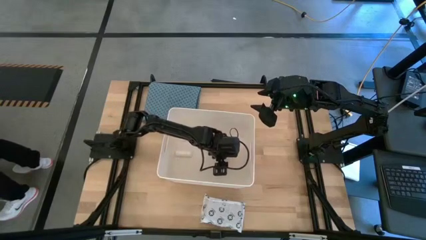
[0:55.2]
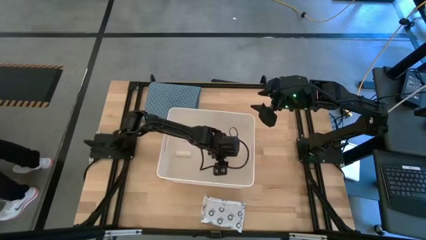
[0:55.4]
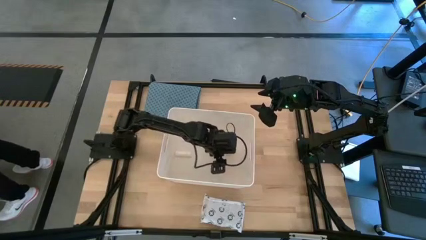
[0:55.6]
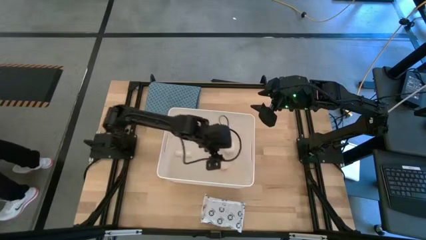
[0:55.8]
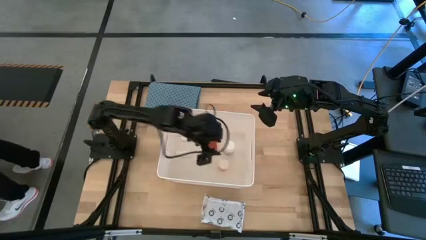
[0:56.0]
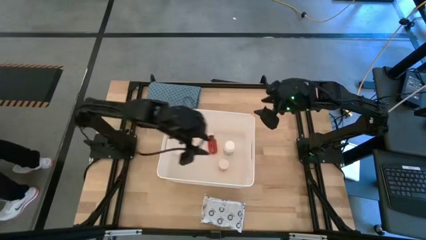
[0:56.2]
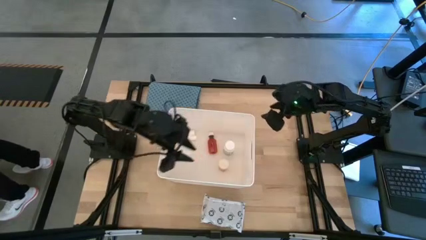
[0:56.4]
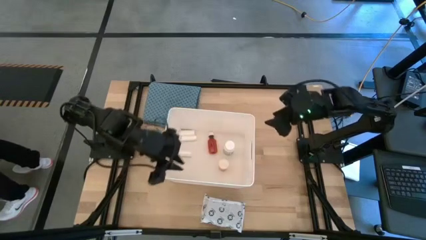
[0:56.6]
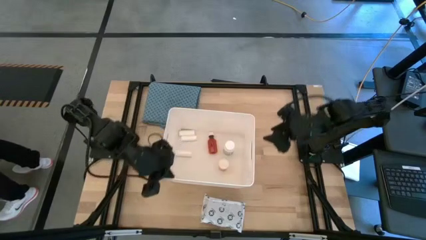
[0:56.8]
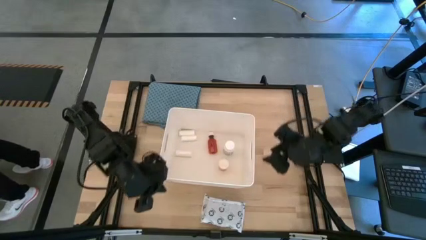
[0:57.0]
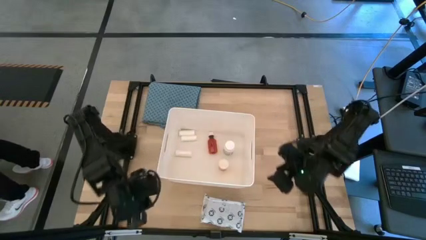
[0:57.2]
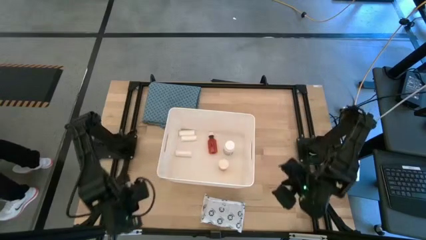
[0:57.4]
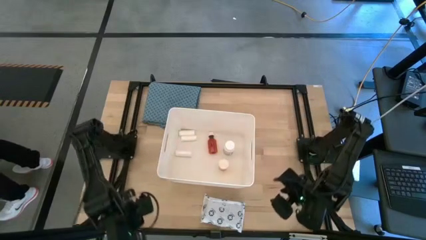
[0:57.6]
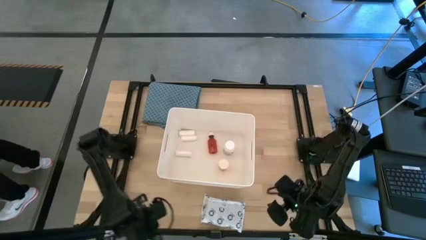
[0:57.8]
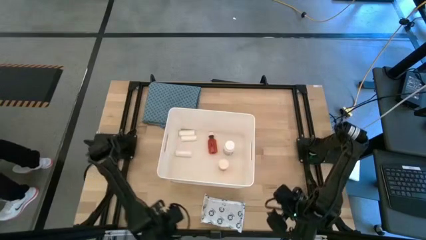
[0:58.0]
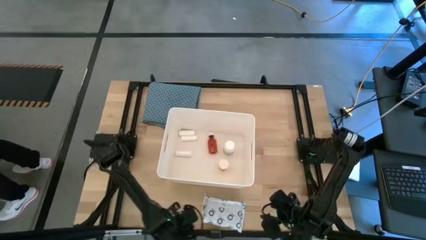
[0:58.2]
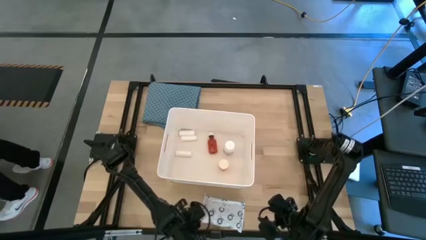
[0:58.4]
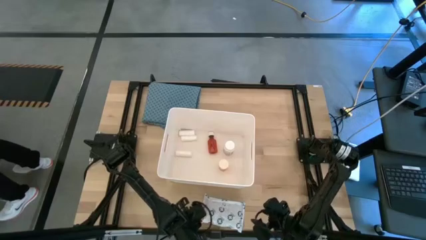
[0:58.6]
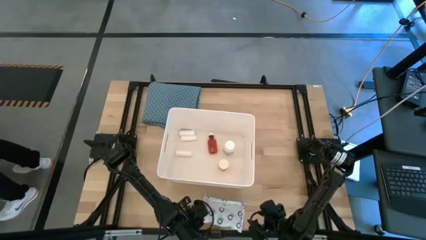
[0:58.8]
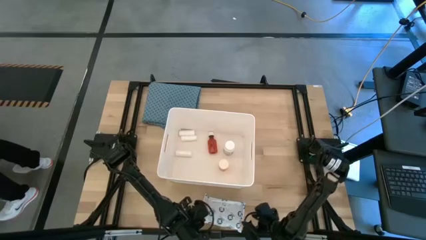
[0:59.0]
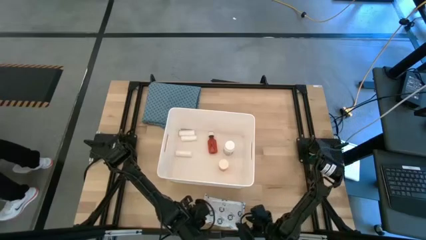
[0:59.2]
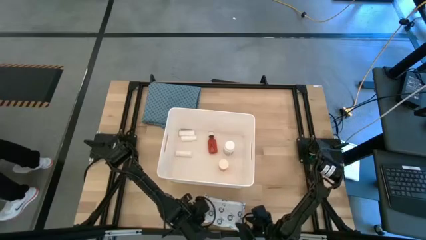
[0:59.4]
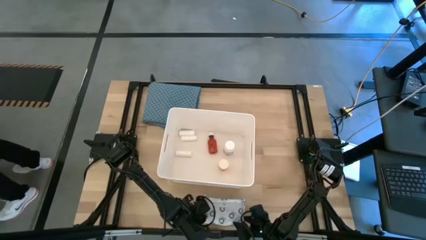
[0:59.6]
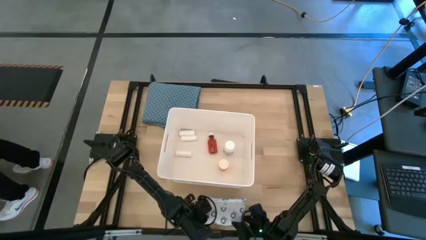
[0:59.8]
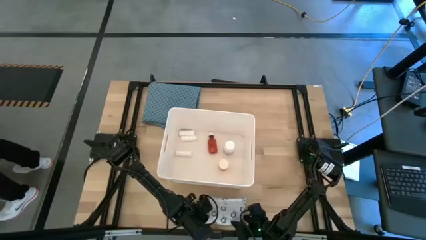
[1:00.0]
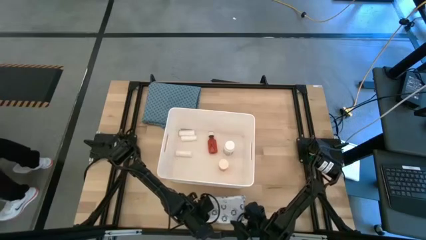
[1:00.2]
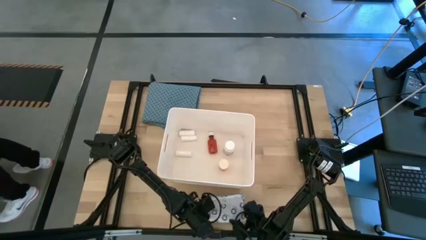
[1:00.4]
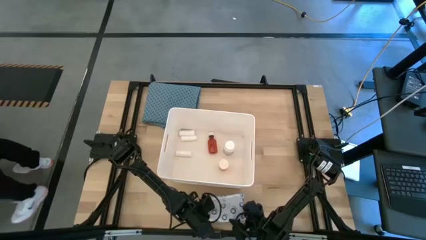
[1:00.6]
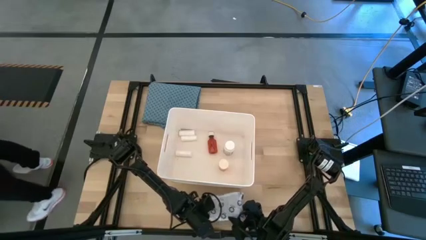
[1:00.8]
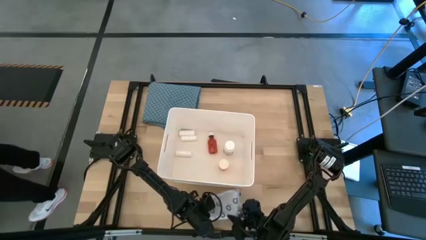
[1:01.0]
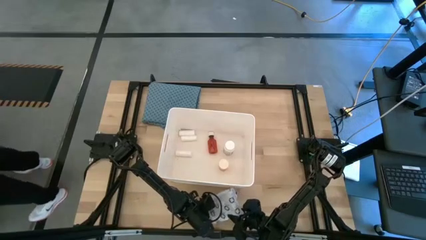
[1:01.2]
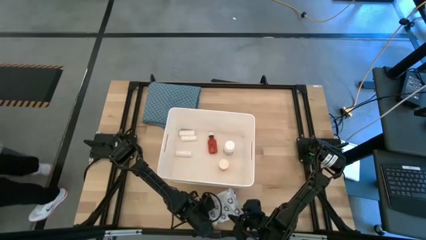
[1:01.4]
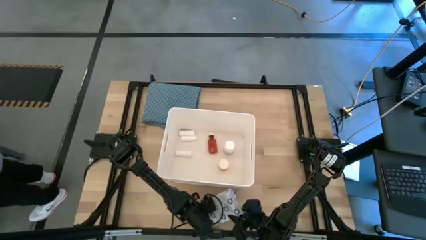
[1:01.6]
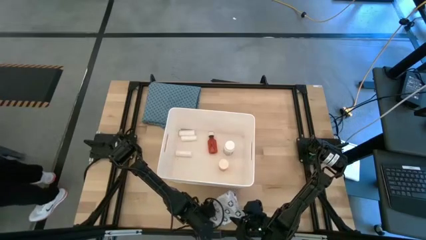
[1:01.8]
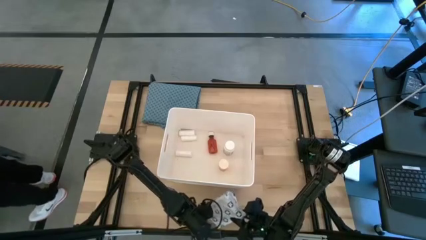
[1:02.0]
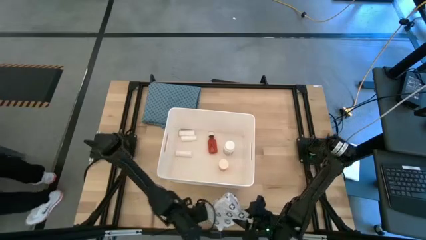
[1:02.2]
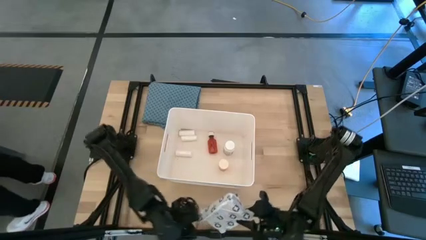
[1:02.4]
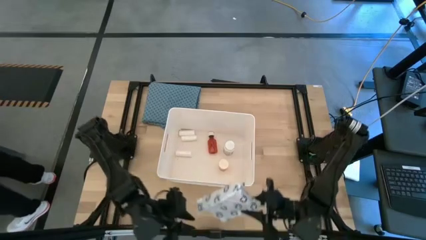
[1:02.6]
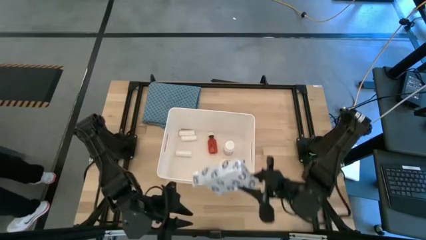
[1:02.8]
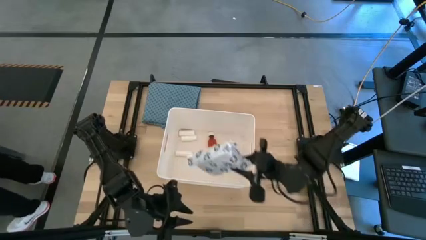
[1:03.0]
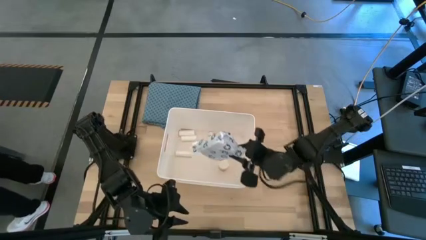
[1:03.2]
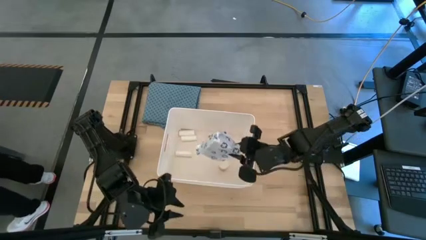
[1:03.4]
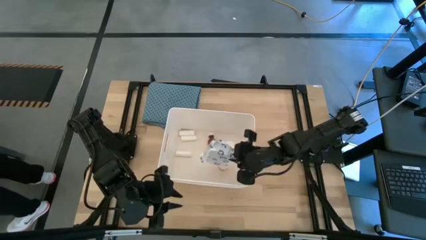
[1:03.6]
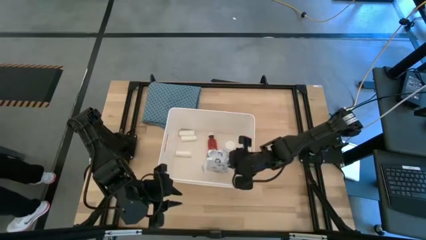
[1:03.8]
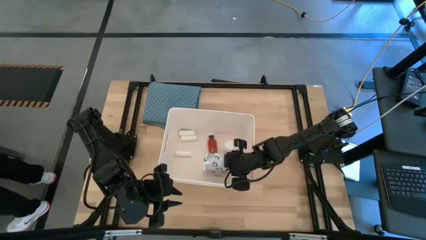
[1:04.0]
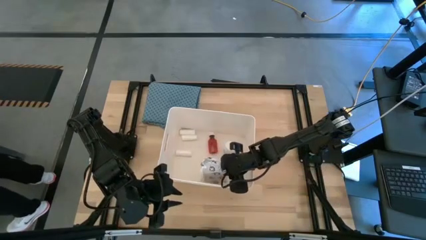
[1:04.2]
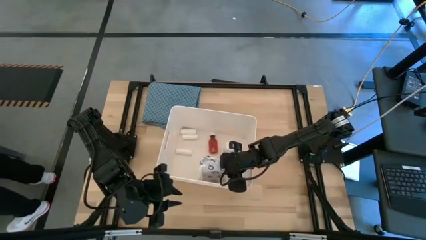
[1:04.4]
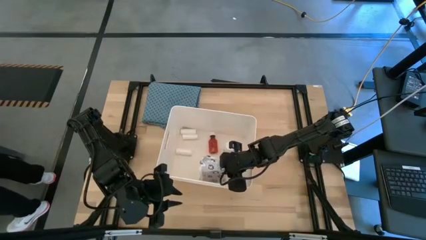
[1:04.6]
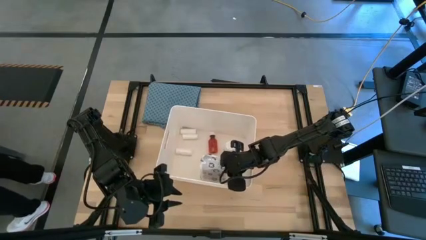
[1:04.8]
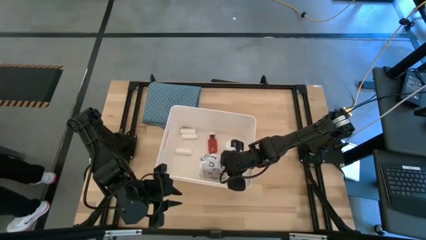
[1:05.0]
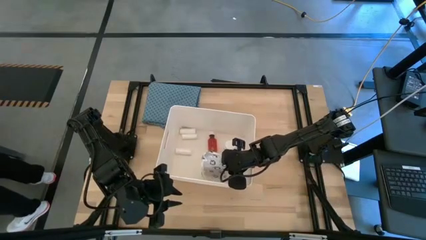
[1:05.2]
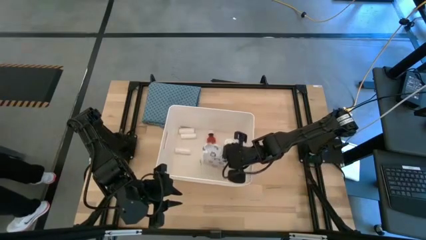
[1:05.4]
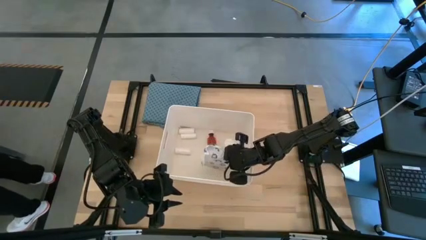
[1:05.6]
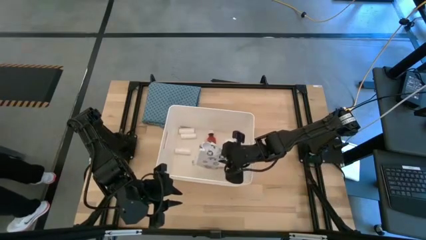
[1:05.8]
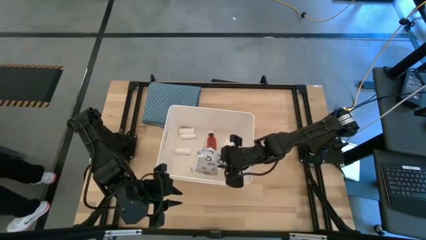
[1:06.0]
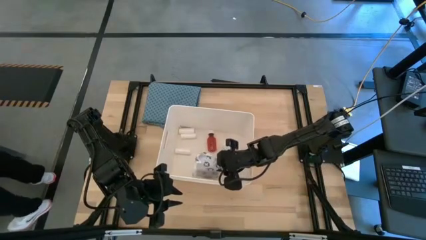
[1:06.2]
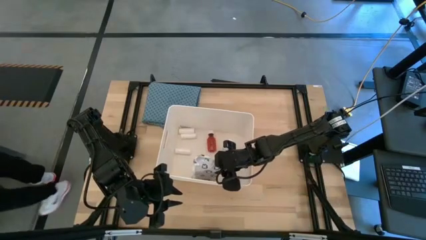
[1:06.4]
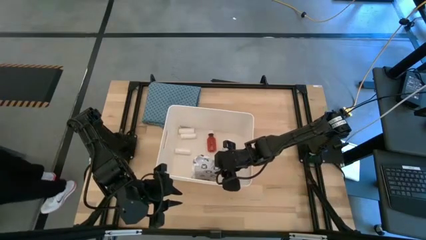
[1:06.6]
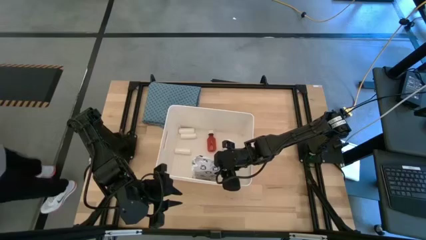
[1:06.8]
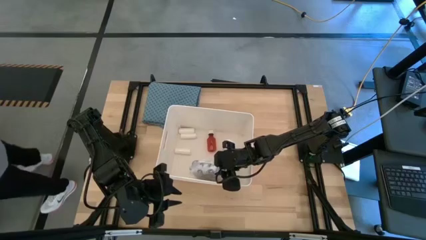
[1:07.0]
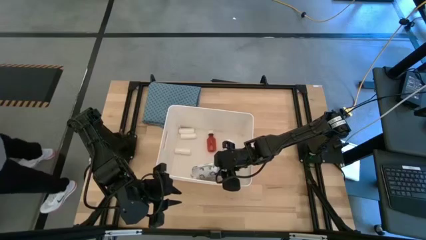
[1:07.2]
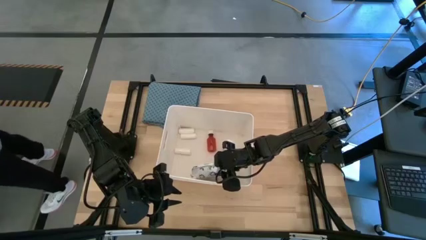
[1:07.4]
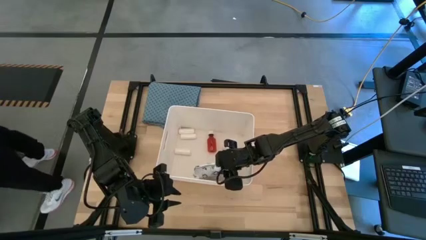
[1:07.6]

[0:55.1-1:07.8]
Task: Pick & place medical supplies in basket/bin
Put the medical supply bag into the white basket

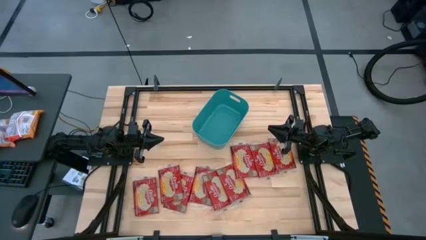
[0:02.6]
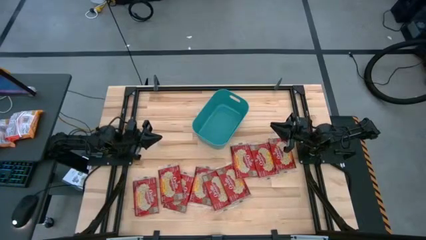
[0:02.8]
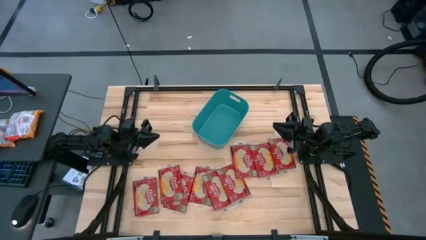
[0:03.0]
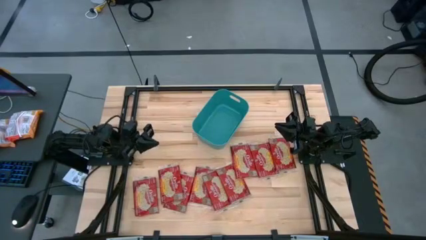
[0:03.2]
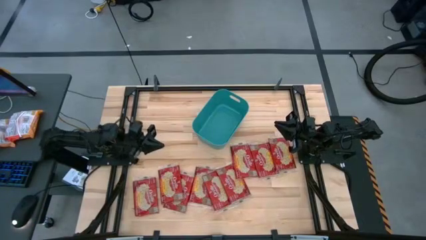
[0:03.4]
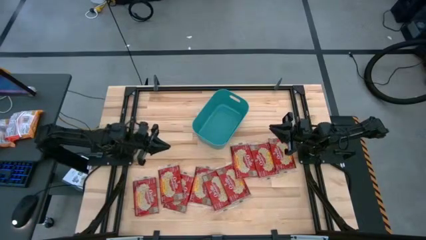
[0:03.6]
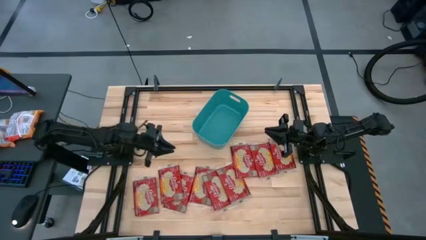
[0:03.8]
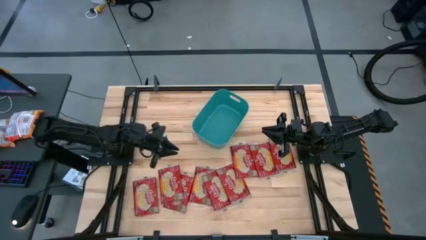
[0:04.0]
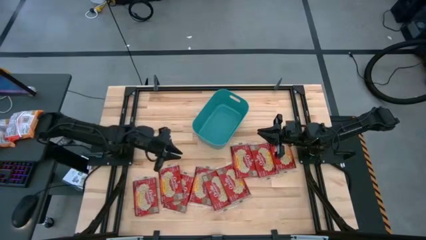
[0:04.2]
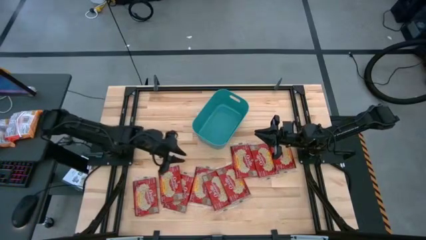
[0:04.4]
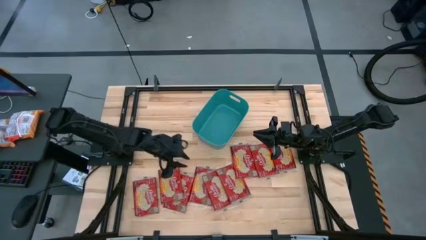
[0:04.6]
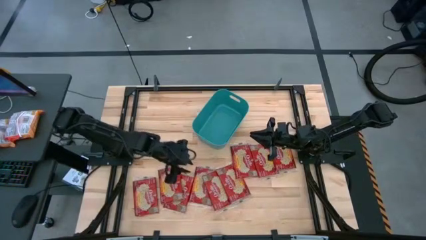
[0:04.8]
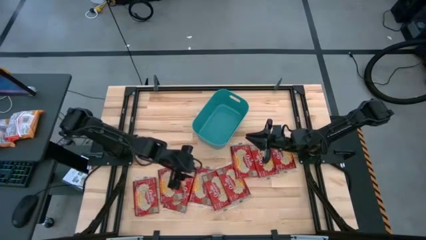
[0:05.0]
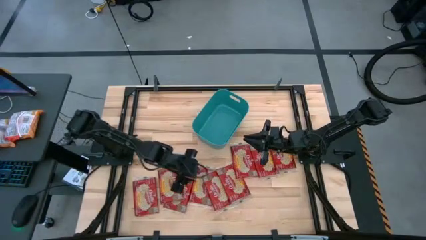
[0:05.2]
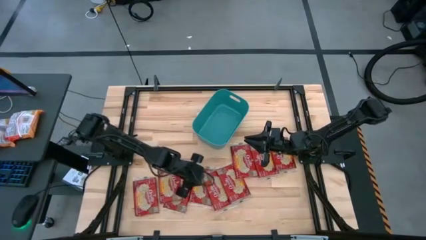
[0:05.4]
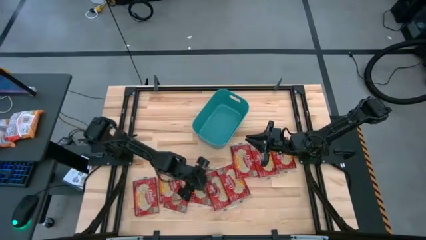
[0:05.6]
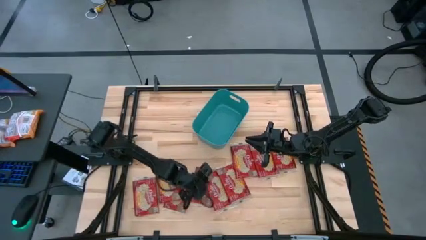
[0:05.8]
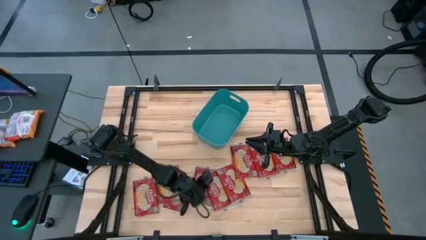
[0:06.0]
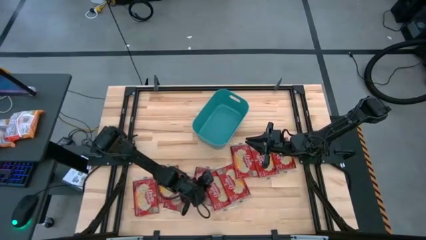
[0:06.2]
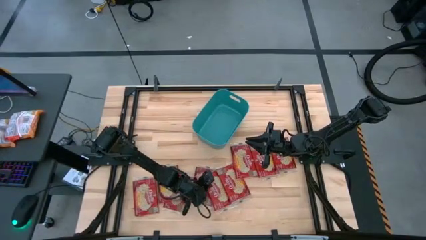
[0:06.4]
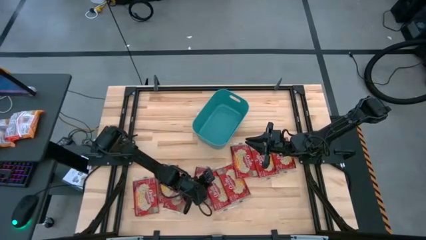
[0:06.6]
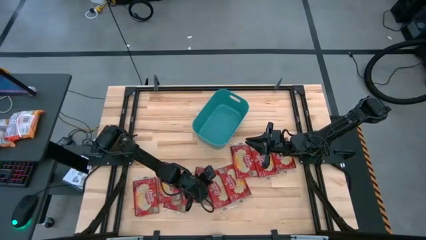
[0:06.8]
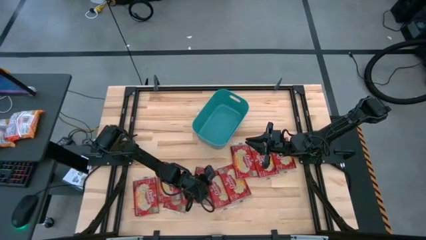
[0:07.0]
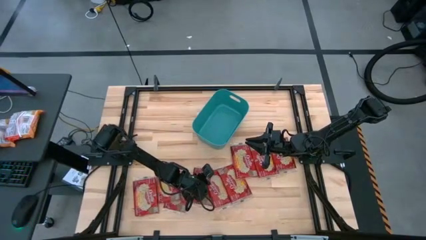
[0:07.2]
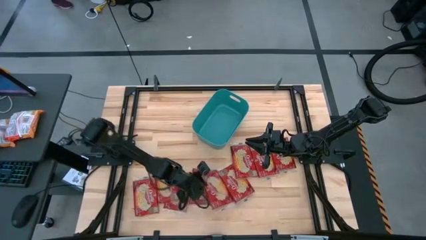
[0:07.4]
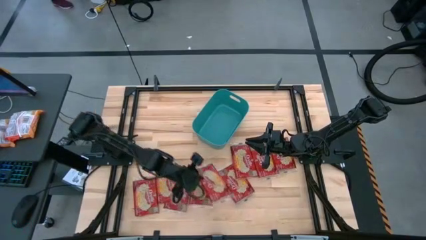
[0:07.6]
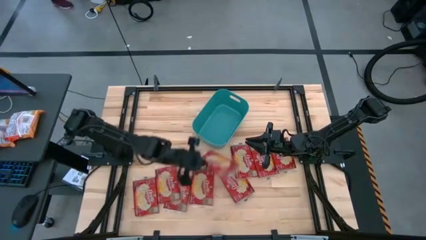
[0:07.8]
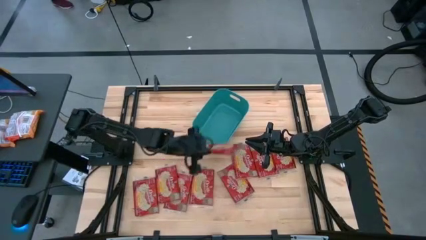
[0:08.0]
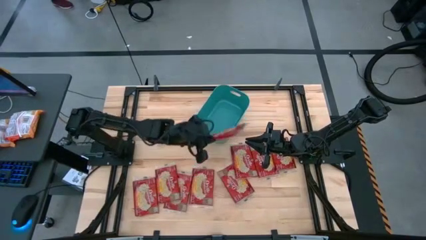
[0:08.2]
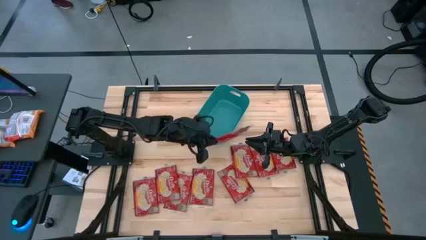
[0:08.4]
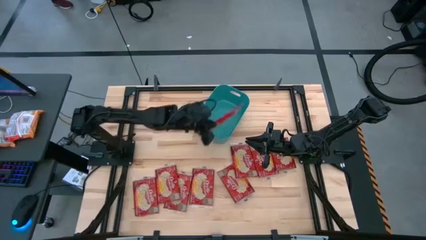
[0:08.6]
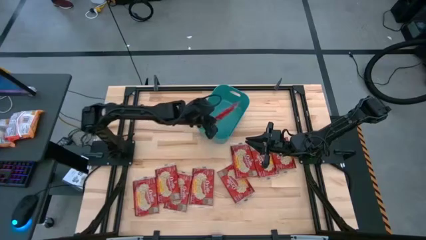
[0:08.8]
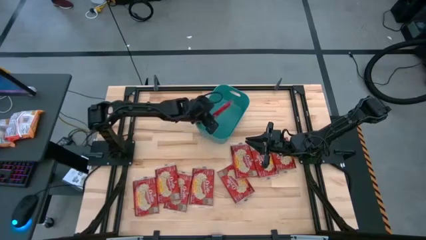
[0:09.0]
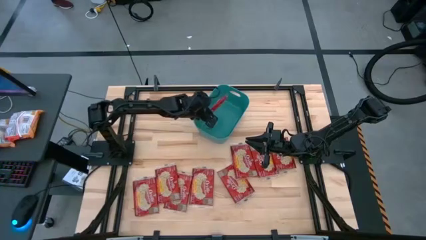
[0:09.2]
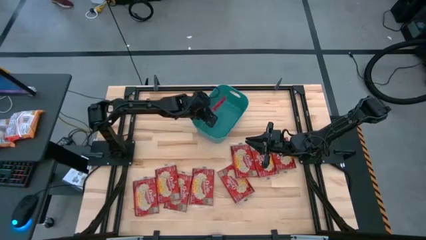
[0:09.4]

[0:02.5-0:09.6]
Task: Sort popcorn bags into baskets
Put the popcorn pack into the blue bin
